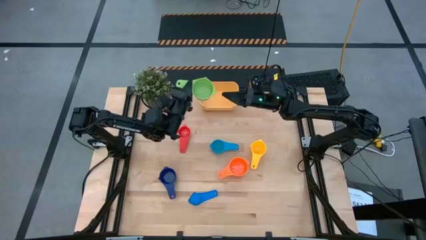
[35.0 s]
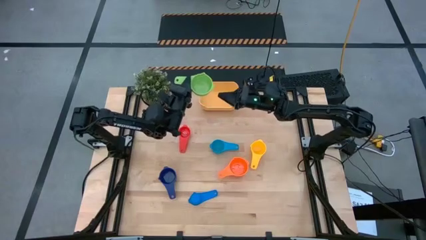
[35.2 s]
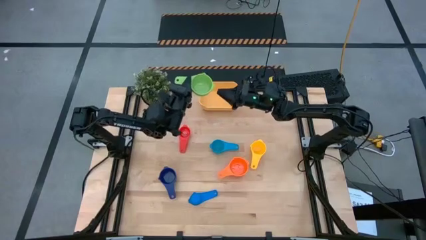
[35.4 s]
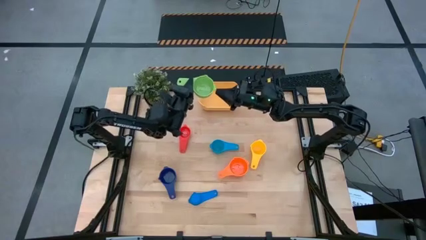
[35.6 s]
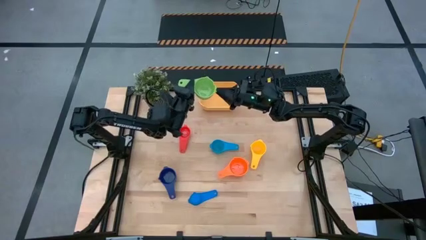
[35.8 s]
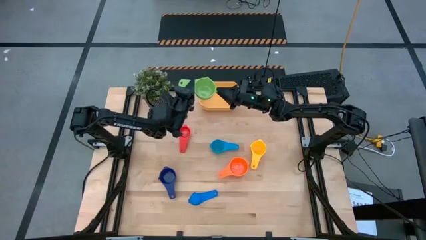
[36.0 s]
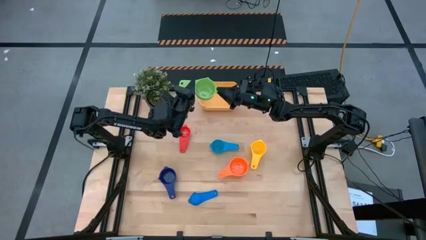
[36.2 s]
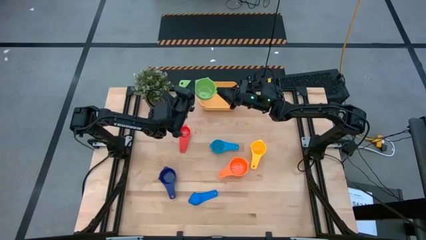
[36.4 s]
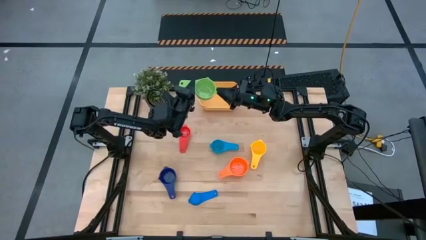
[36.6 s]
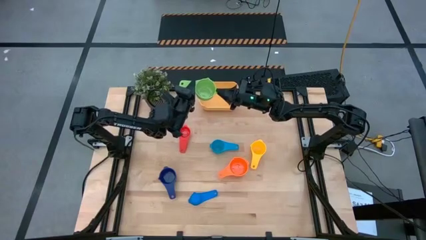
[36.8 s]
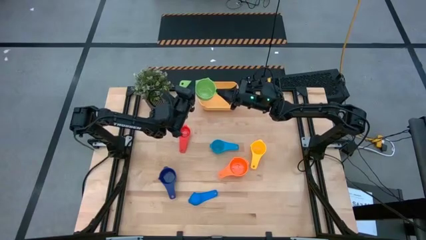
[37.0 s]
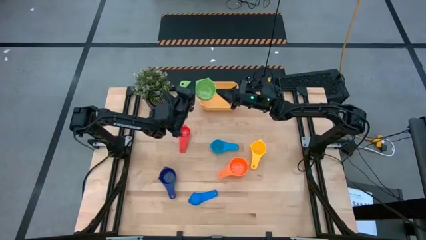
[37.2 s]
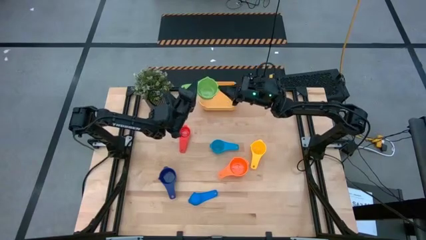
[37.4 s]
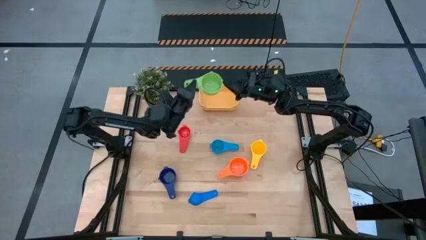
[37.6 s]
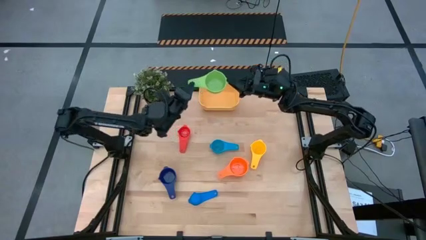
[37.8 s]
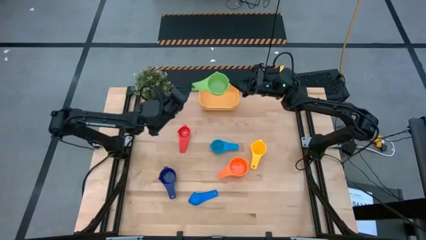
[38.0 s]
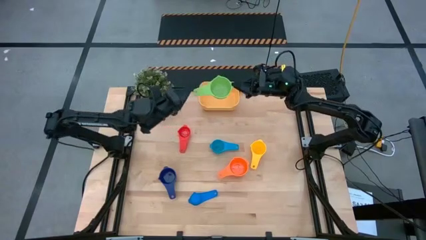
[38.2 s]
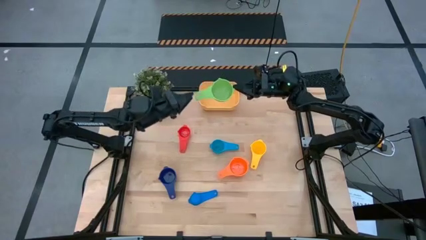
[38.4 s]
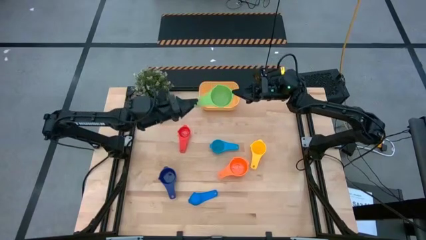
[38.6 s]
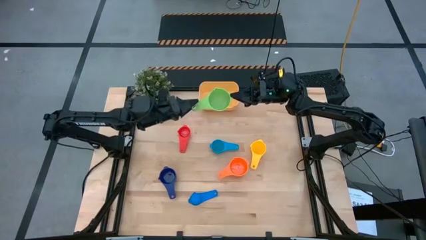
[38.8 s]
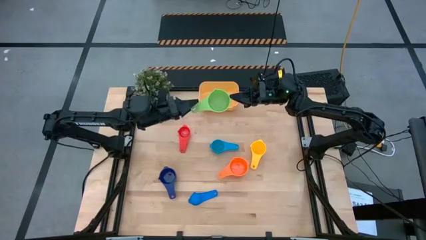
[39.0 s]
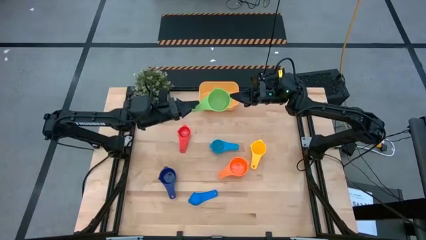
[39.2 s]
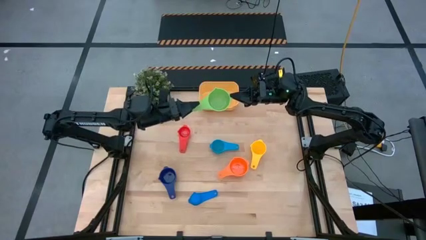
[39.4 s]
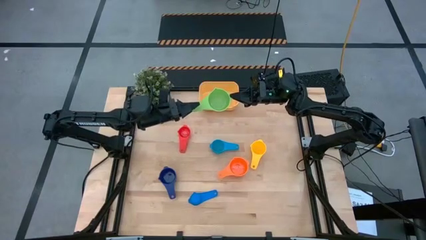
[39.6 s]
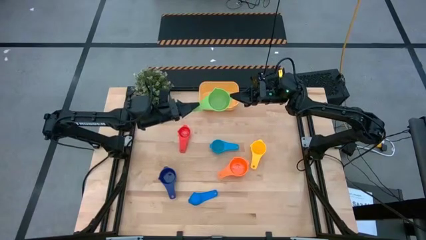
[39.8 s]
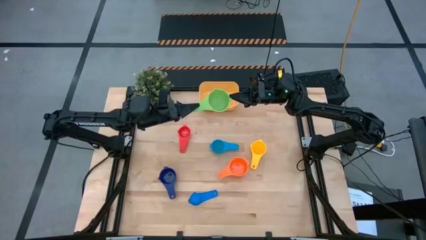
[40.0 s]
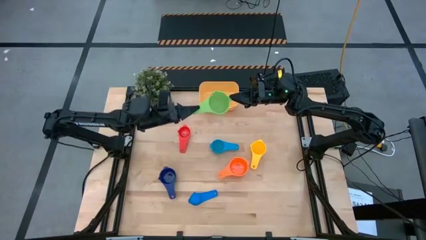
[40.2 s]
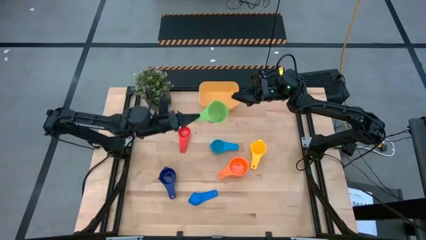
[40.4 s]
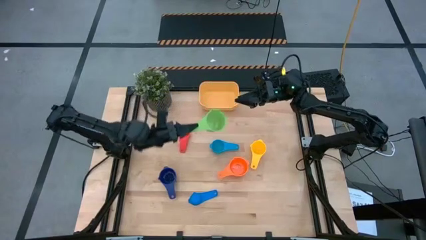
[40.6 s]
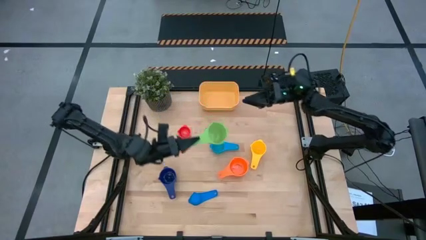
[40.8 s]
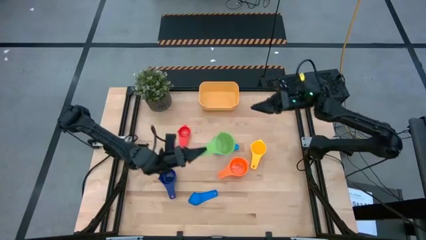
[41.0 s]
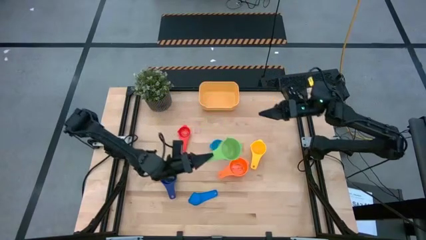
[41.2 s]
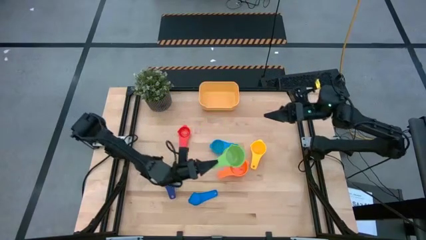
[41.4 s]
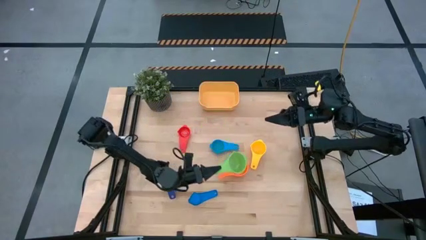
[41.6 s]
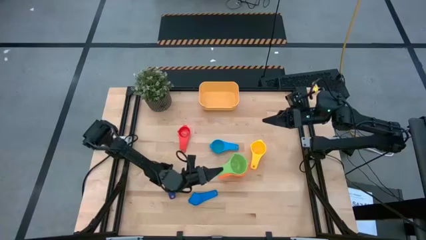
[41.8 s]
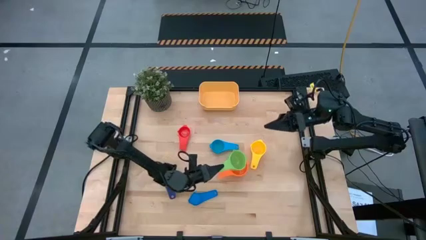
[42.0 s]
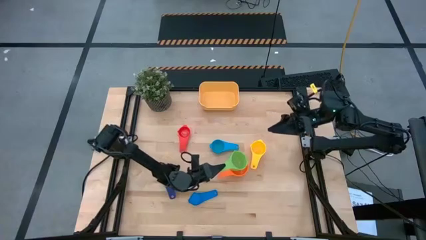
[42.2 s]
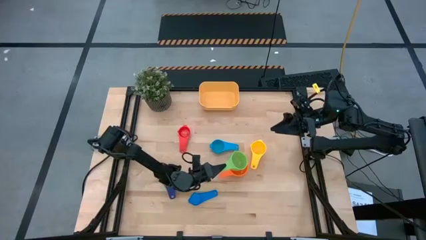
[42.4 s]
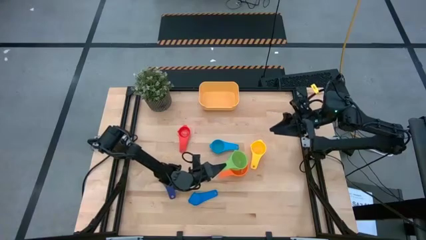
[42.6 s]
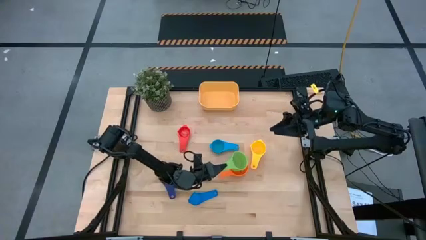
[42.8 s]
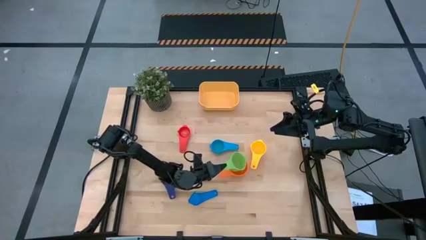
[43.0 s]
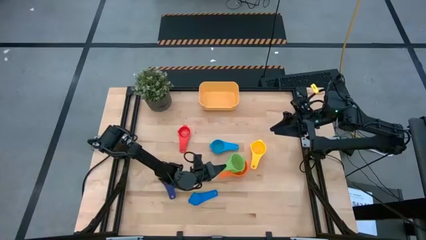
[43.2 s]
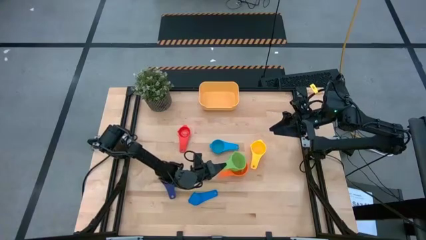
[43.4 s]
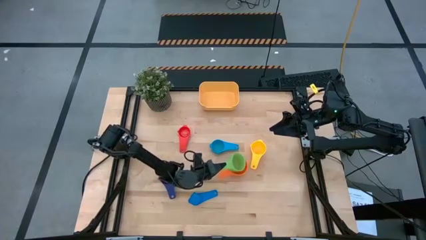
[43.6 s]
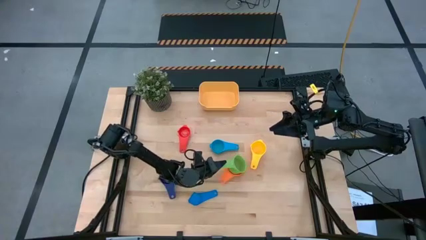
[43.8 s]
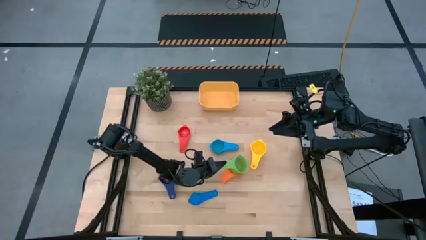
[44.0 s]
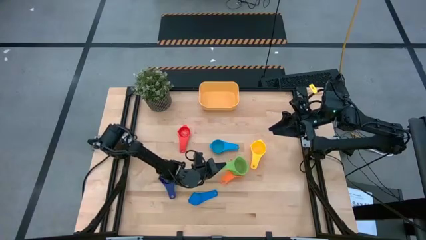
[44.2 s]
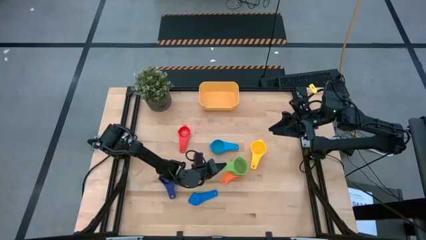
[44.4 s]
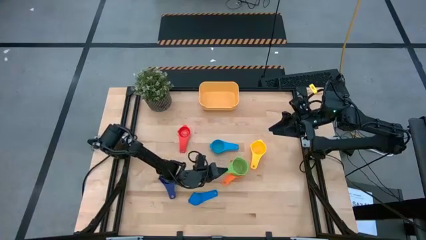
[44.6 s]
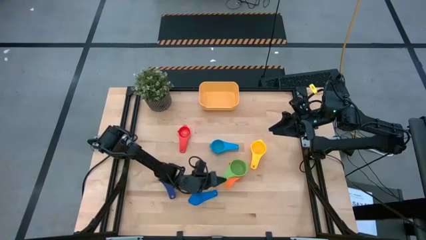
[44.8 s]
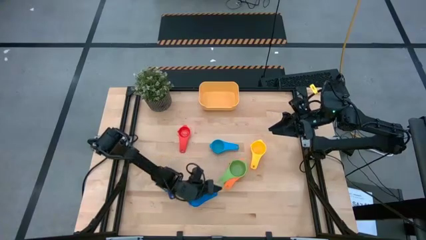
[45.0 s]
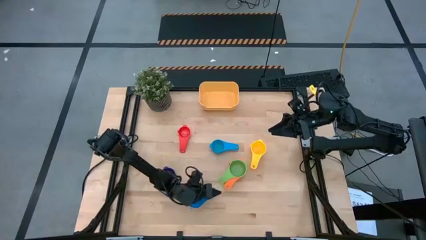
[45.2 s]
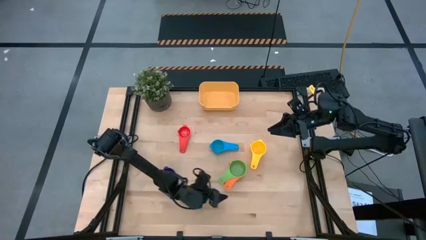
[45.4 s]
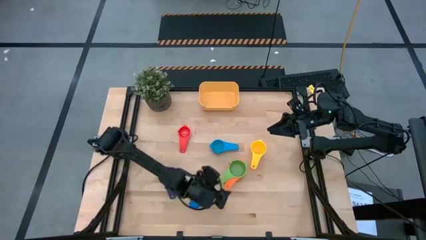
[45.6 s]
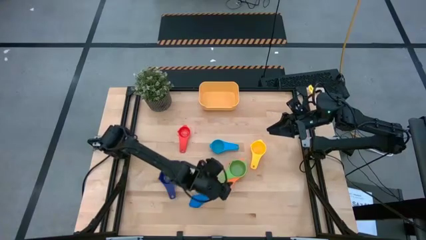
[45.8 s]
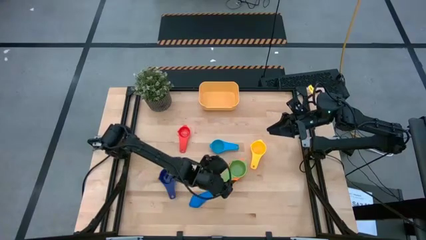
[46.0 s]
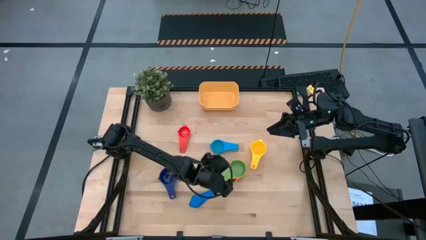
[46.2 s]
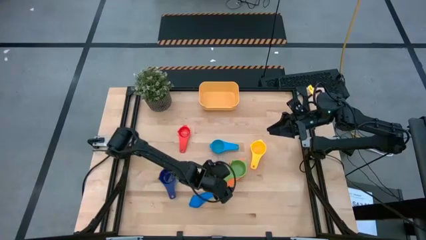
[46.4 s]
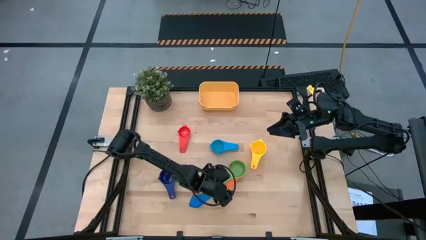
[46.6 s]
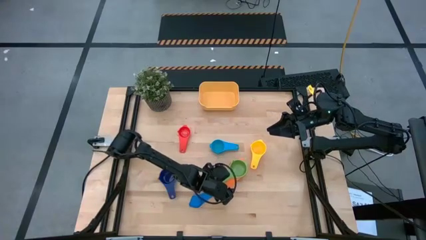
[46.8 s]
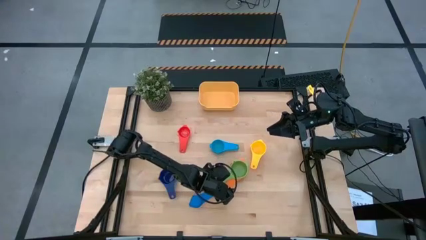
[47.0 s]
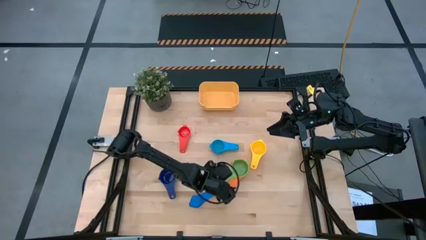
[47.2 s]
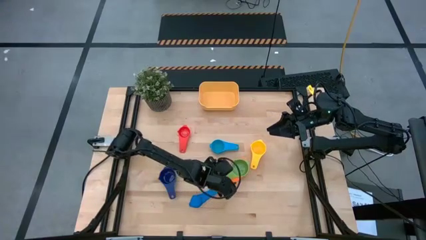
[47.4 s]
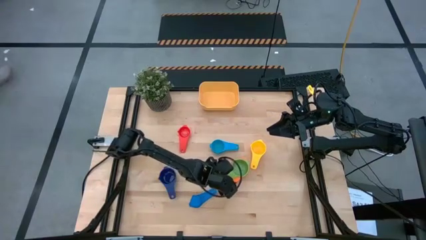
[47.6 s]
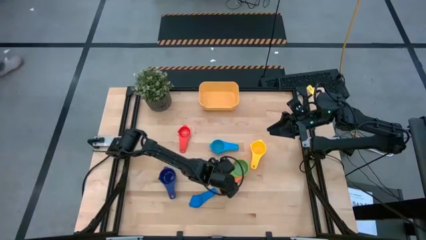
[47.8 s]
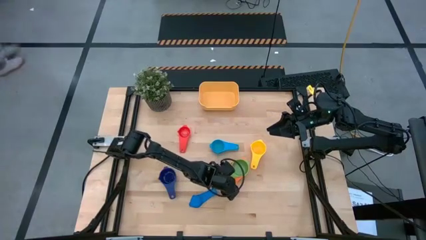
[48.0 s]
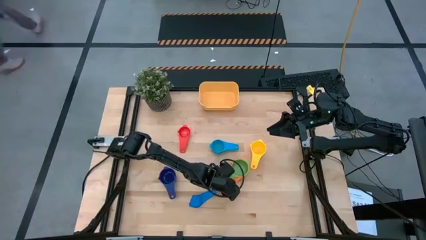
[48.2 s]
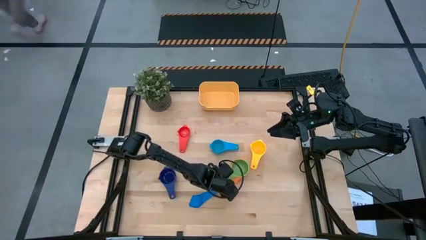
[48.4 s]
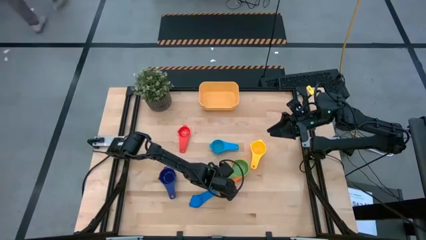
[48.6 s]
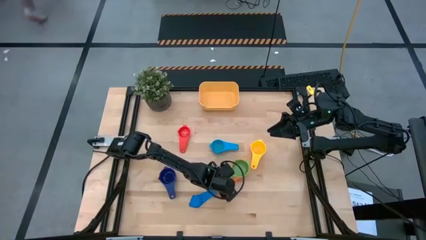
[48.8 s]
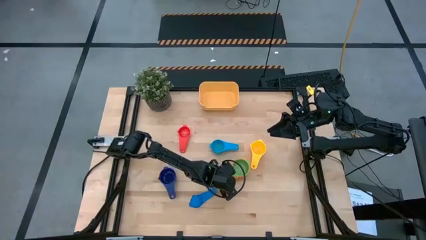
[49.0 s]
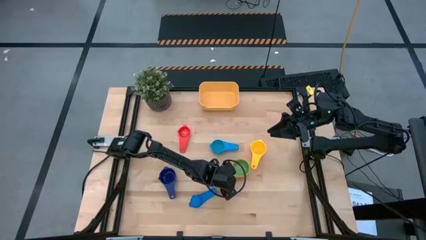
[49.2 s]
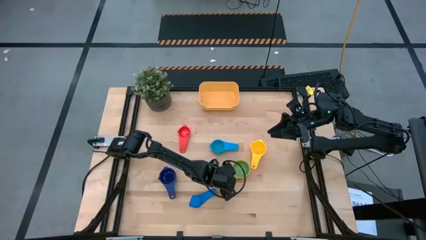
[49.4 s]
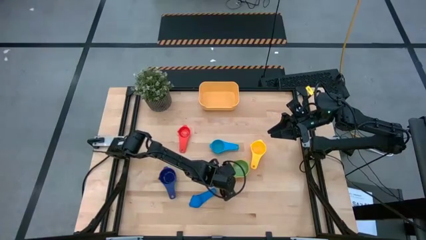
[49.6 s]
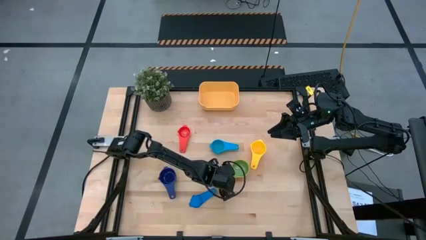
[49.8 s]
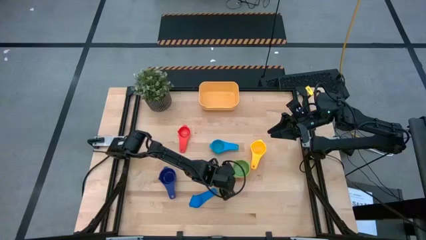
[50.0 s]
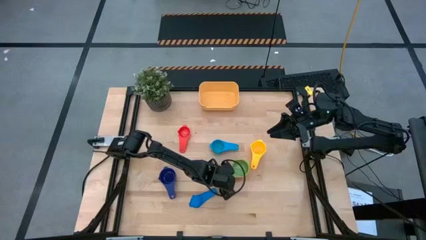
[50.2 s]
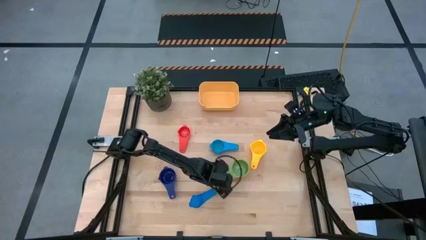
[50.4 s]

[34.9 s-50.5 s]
Task: Nest measuring cups in basket
Stack the green measuring cup on top of the orange measuring cup

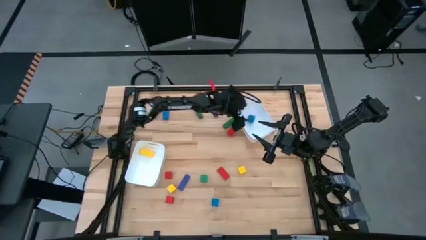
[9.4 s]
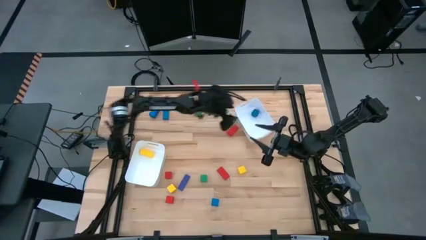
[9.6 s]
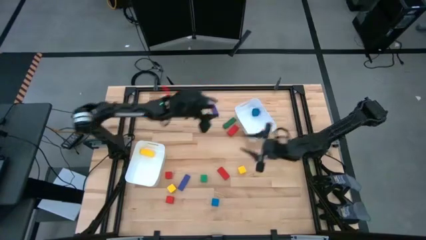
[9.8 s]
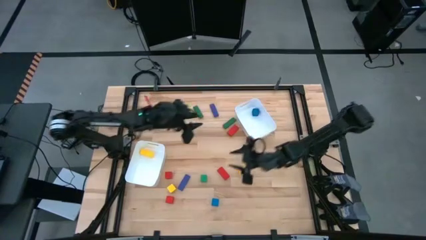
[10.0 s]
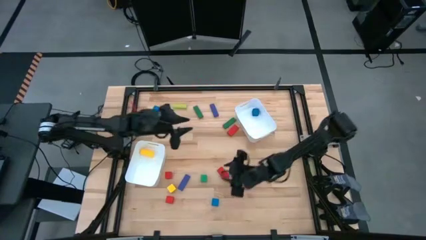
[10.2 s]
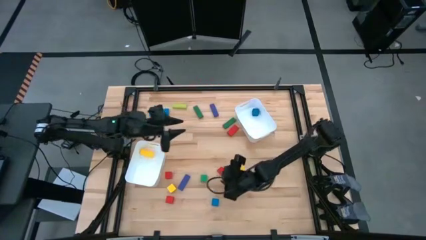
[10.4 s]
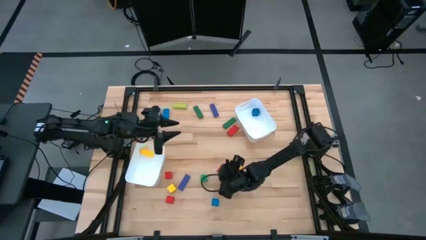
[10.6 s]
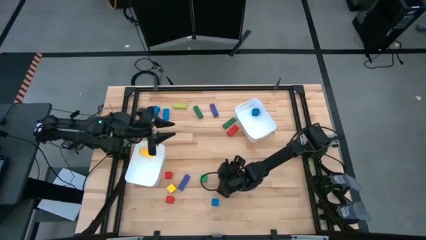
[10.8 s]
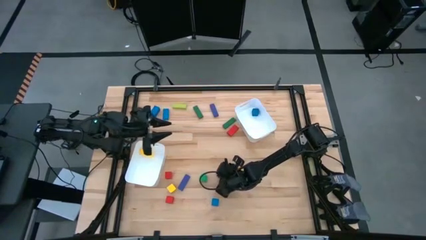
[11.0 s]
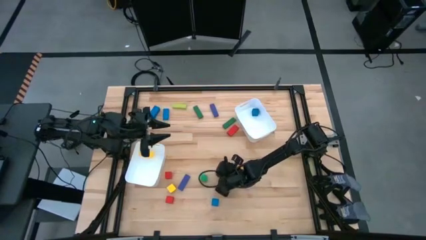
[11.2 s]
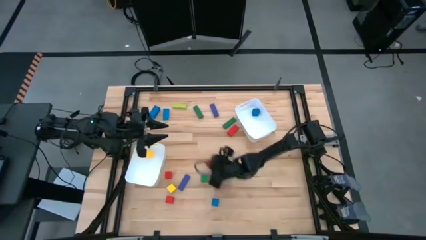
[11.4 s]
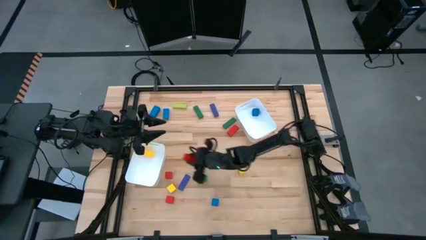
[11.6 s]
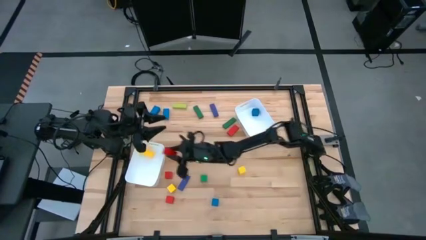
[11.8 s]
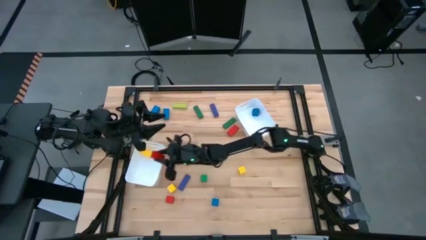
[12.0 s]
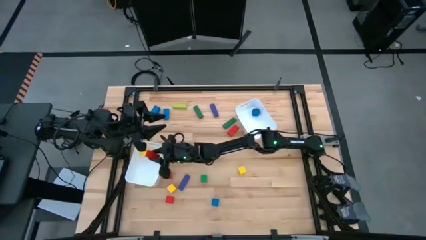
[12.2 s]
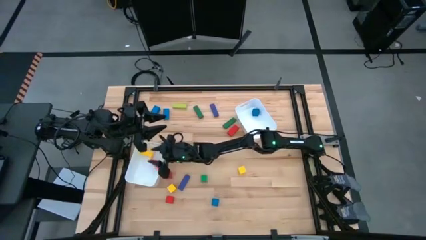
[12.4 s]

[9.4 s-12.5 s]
Task: Sort blocks by size
Put the large red block into the left white bin
